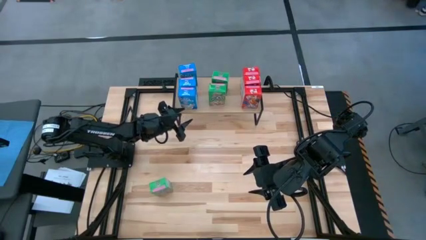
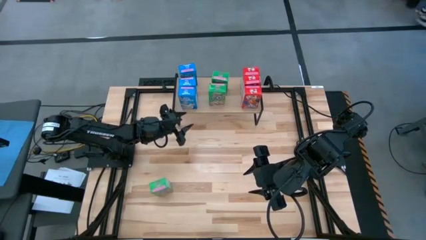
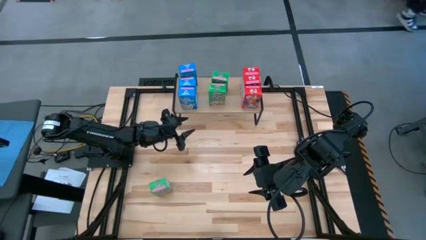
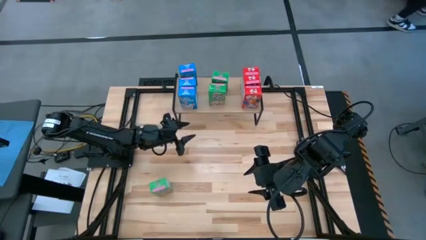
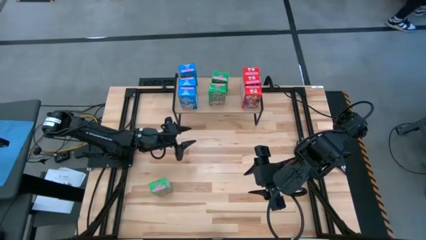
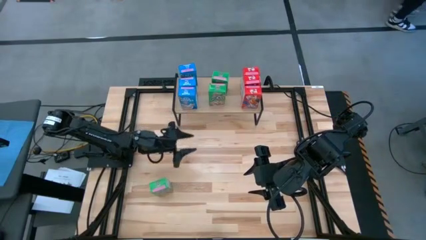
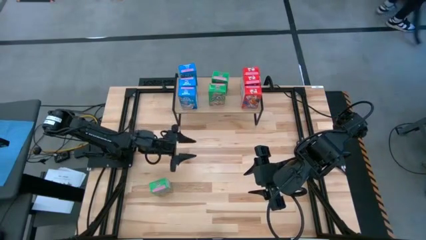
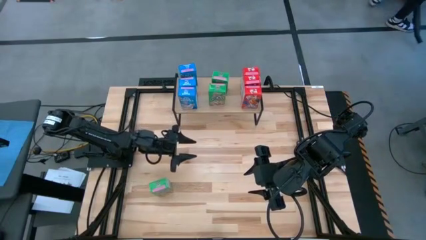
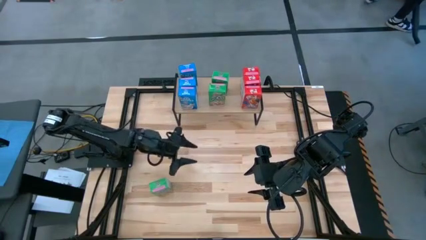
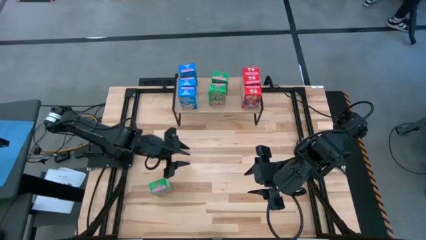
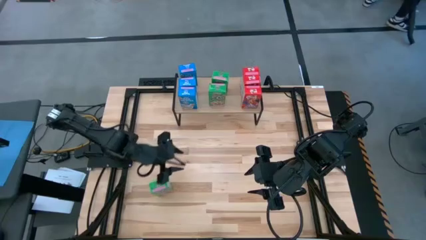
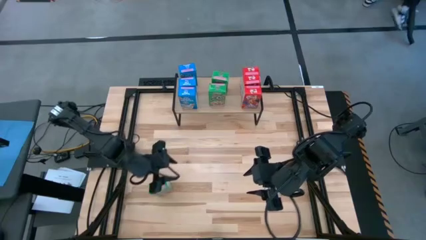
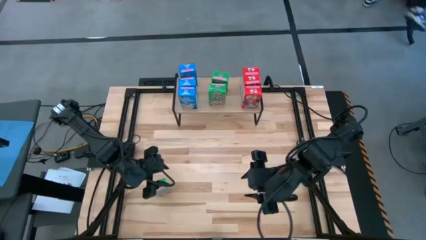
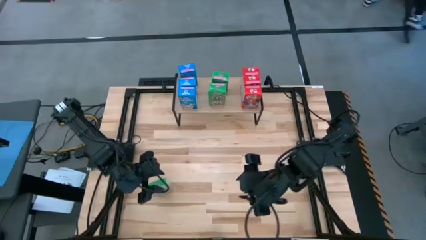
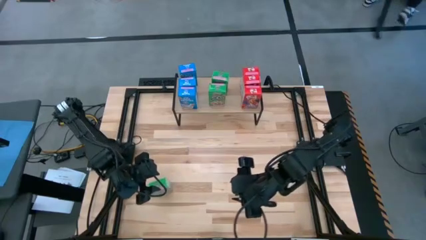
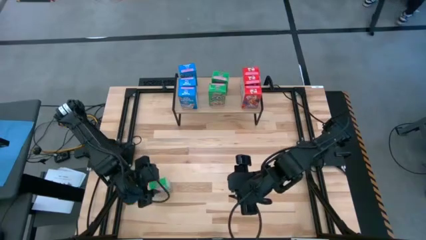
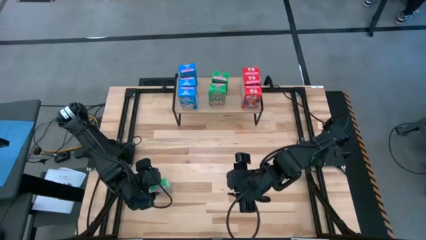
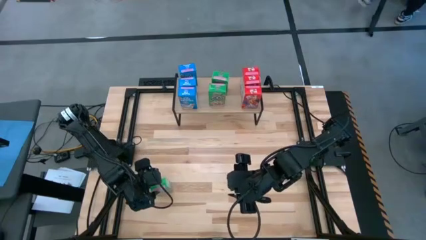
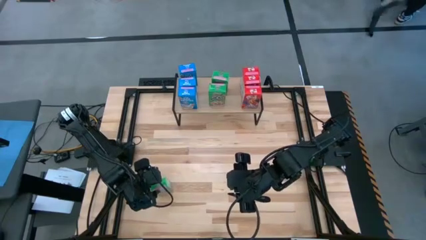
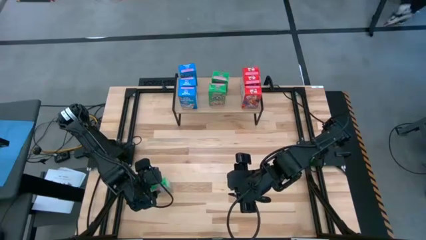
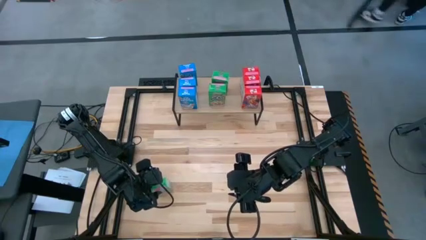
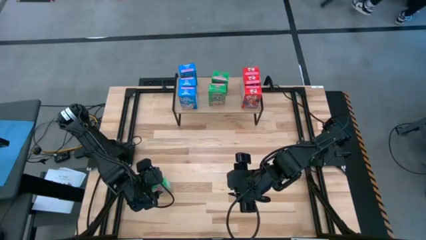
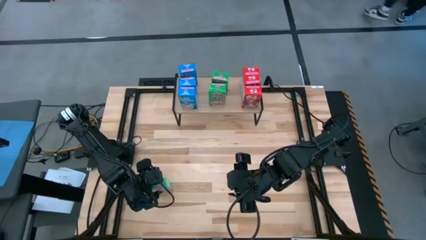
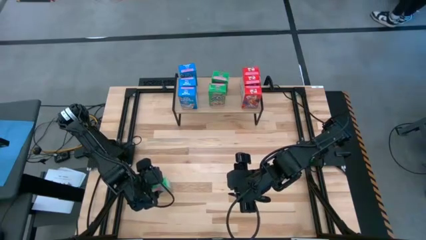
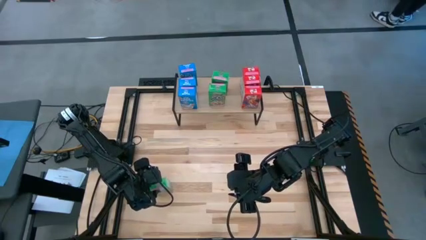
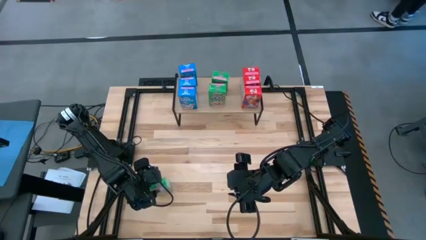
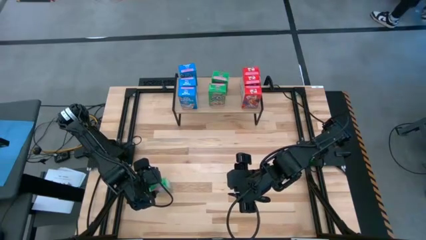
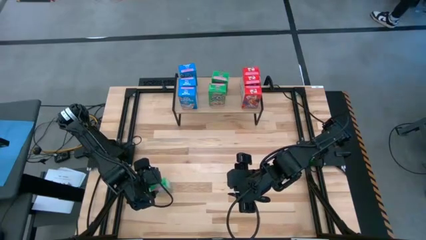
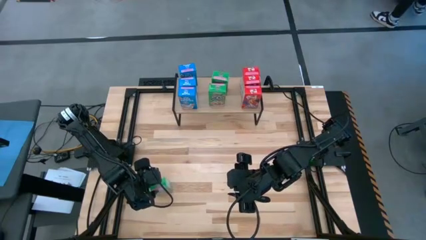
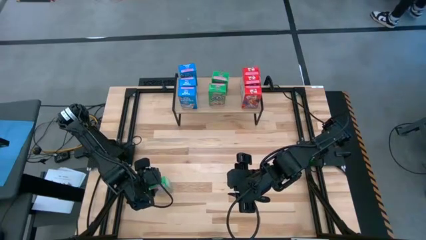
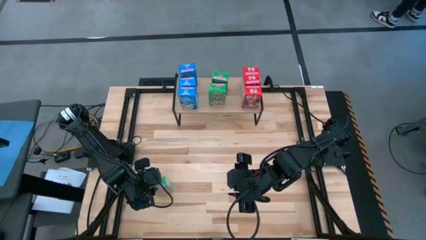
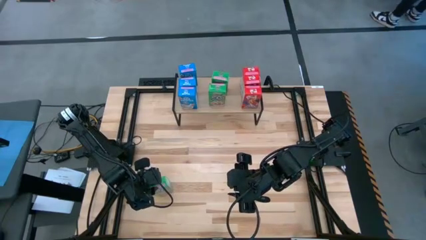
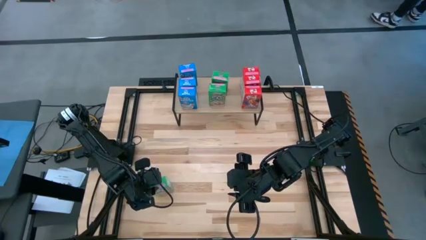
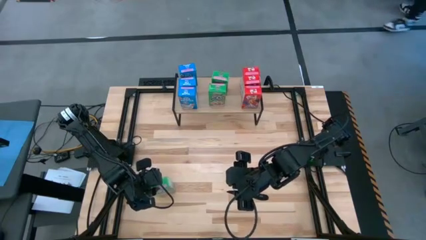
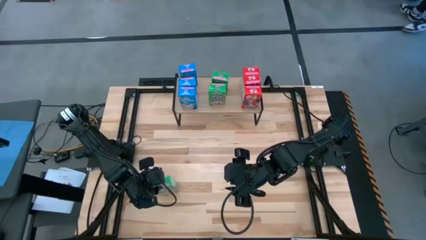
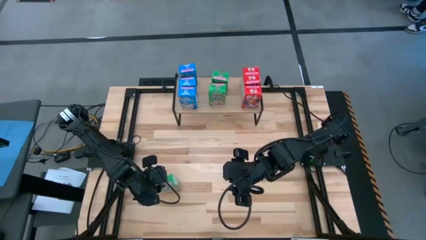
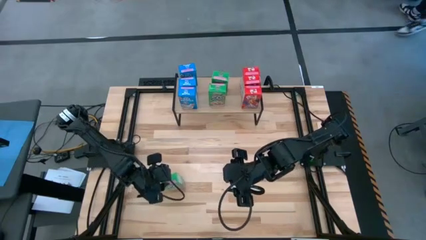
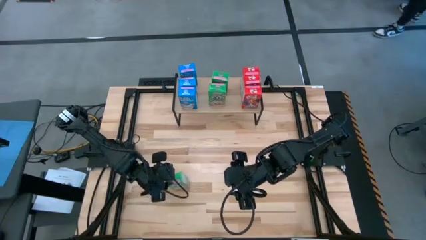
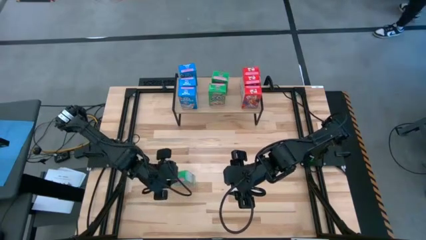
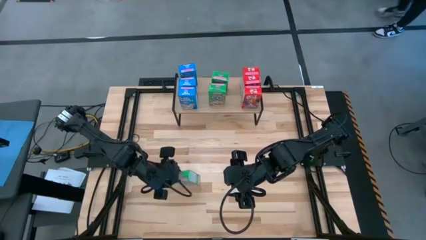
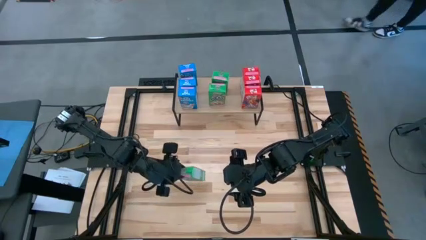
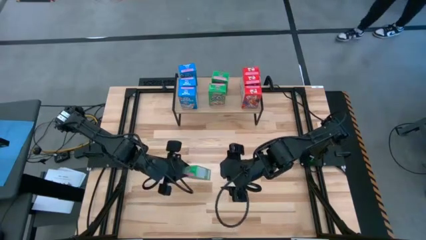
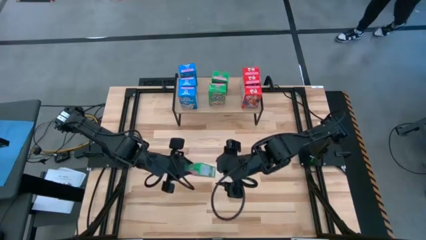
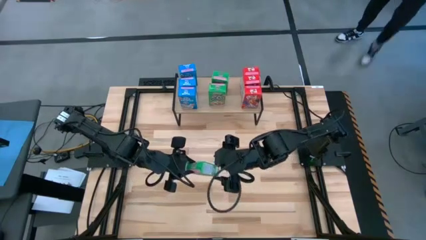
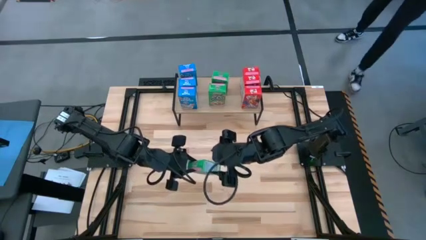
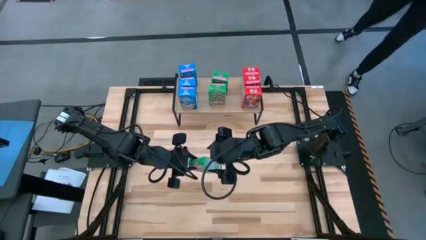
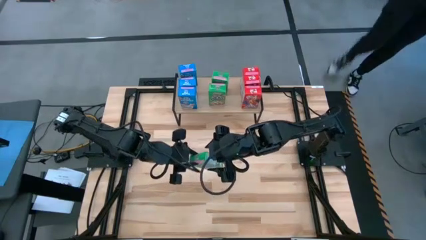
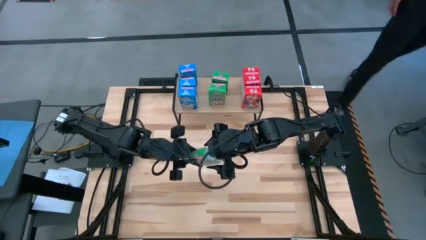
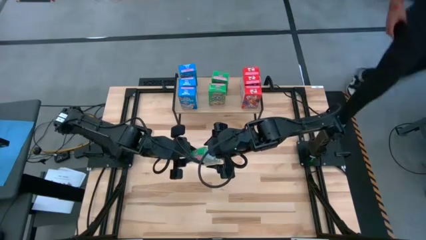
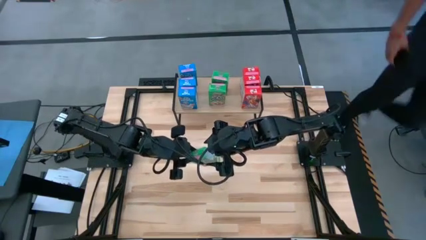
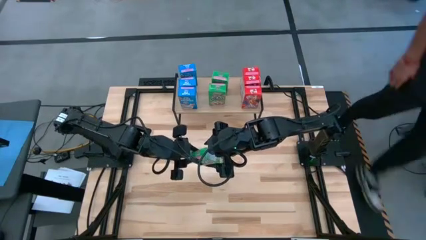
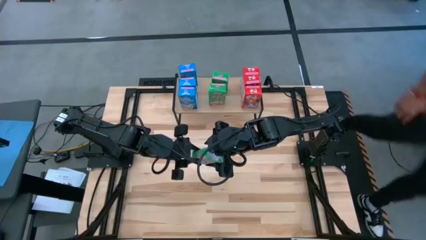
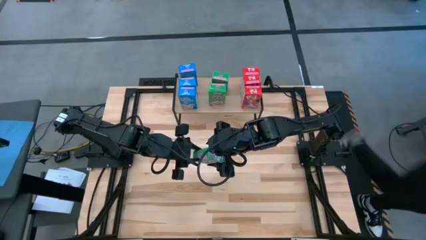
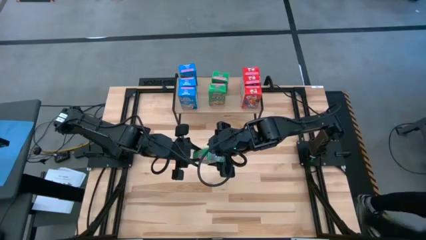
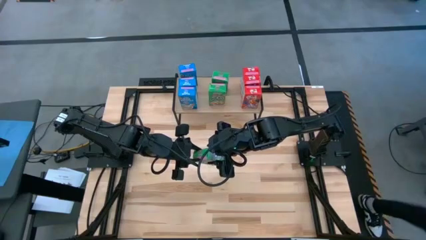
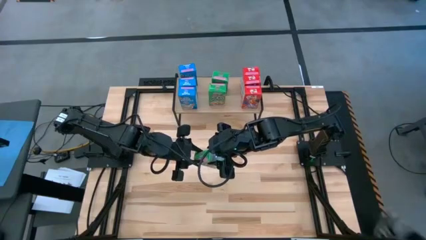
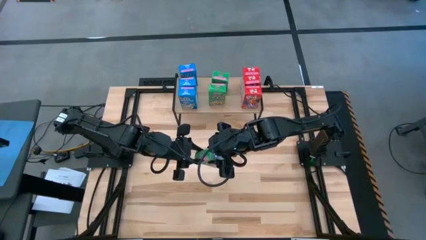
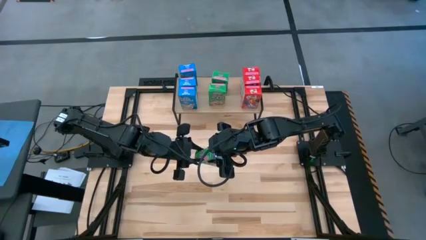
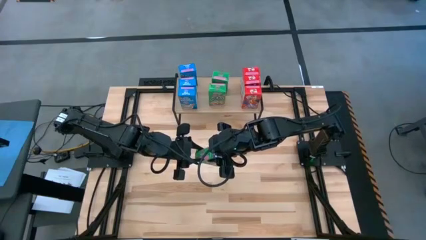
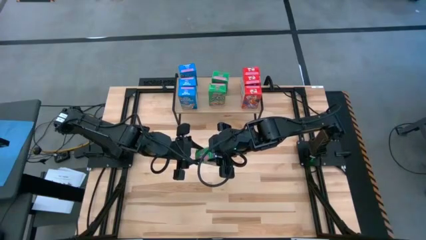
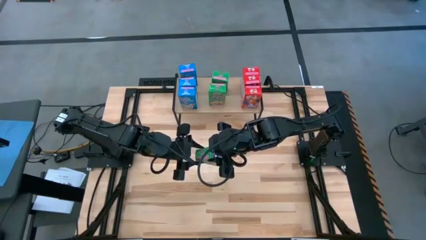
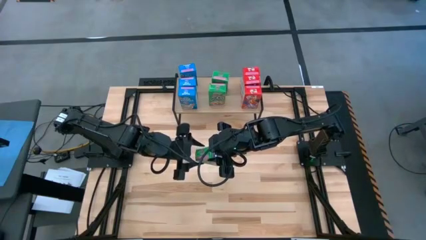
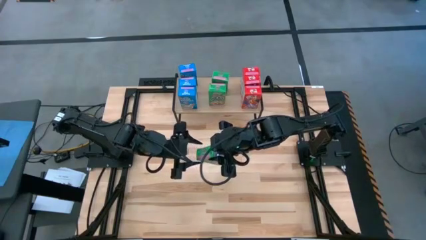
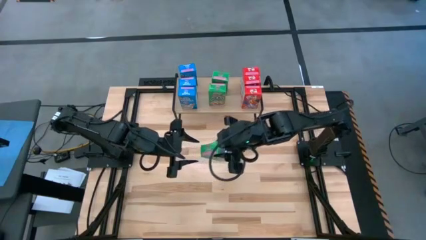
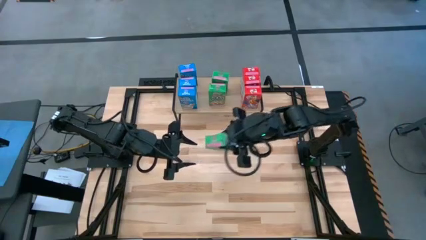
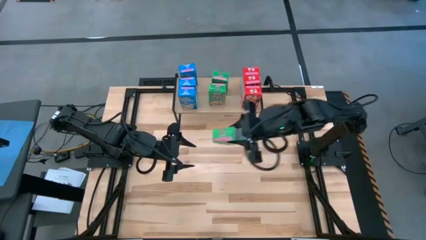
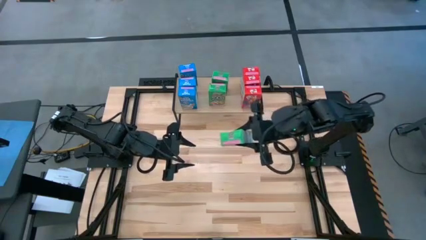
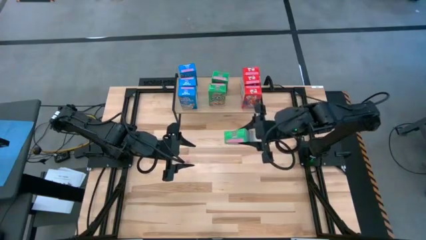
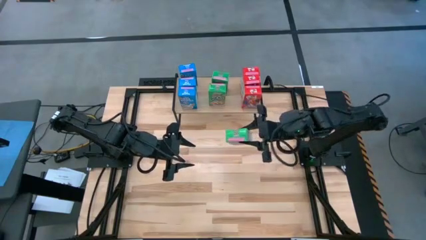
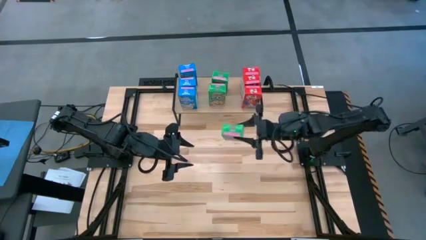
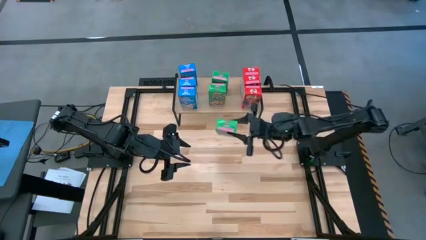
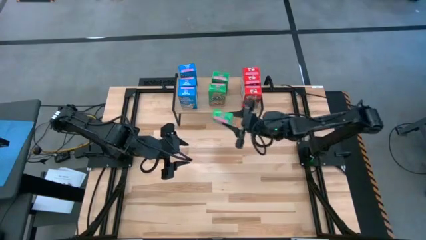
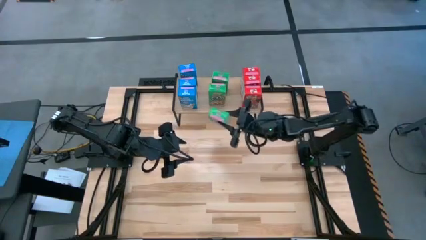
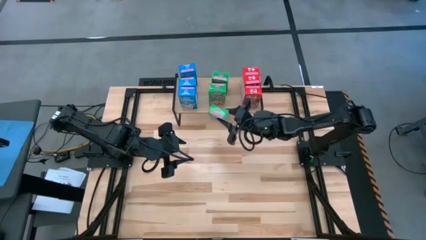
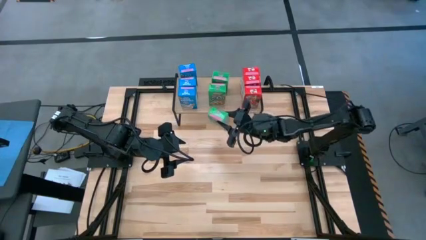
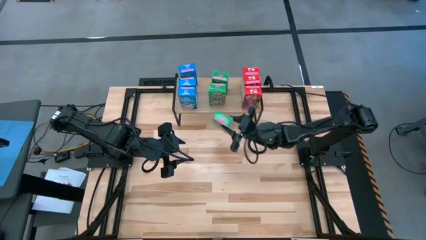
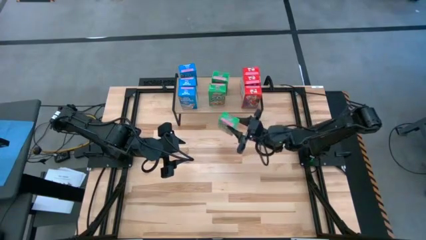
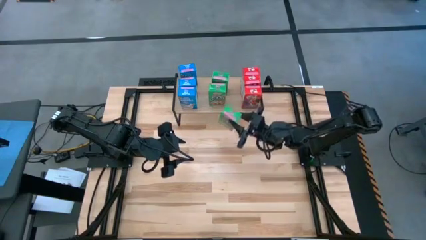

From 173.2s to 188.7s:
Task: Stack cereal on shelf
Put the green cereal box on the shelf aligned with the other green cereal boxes
